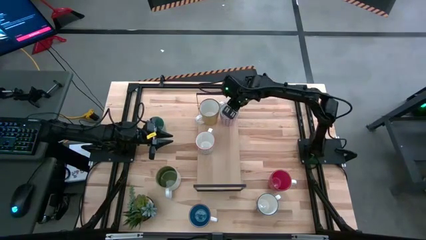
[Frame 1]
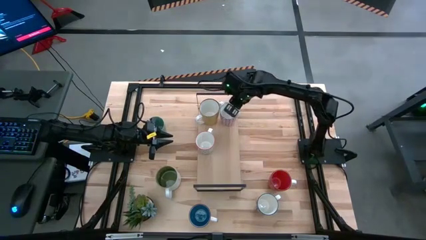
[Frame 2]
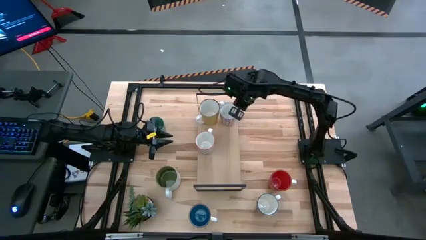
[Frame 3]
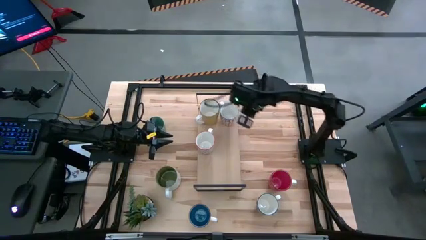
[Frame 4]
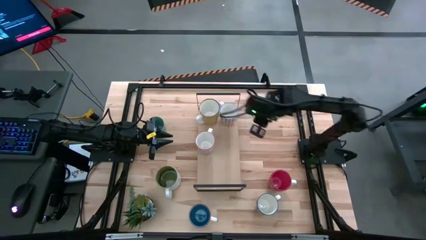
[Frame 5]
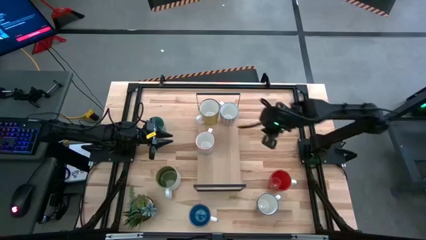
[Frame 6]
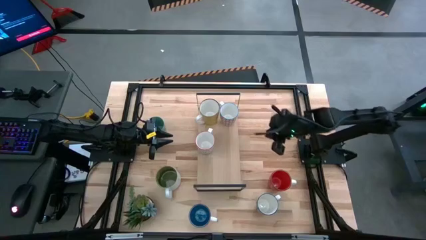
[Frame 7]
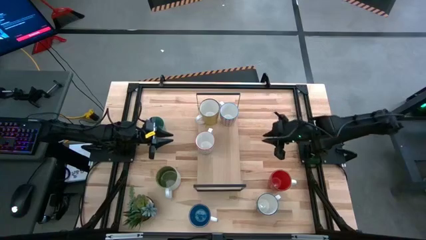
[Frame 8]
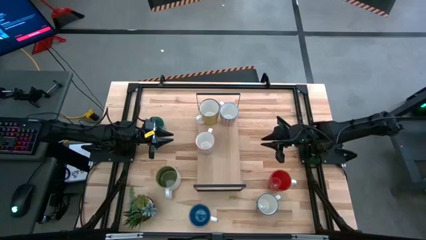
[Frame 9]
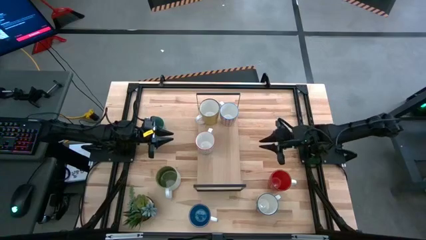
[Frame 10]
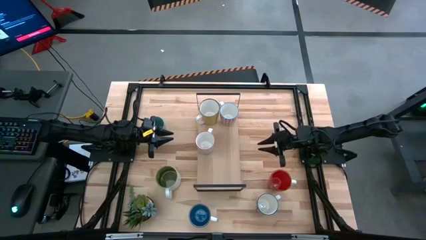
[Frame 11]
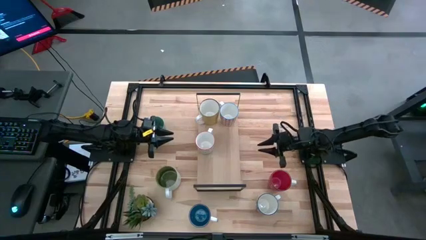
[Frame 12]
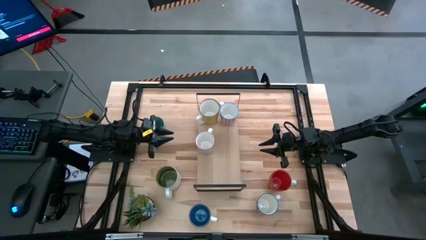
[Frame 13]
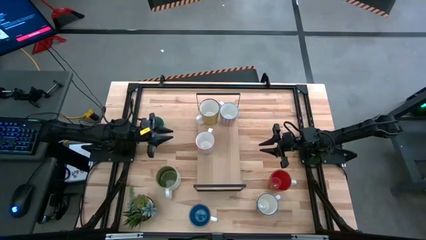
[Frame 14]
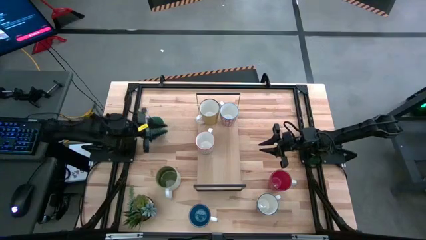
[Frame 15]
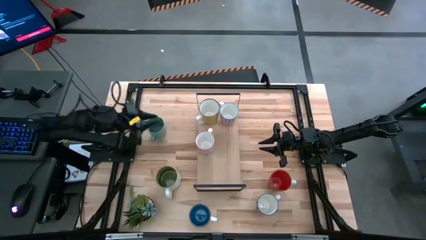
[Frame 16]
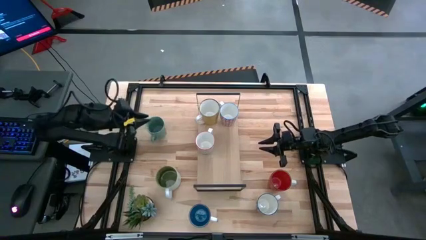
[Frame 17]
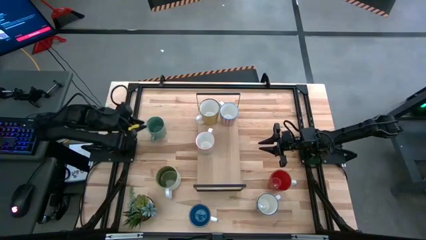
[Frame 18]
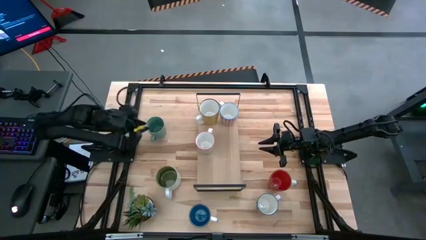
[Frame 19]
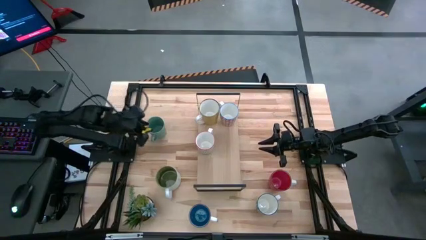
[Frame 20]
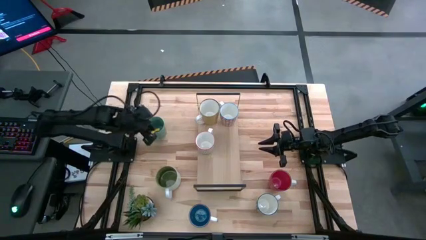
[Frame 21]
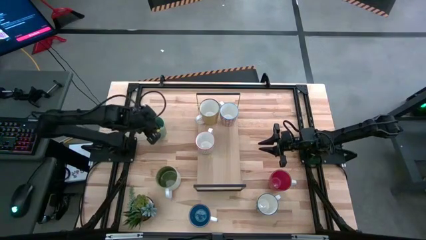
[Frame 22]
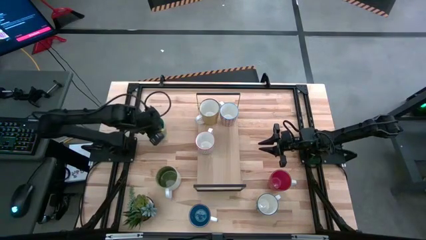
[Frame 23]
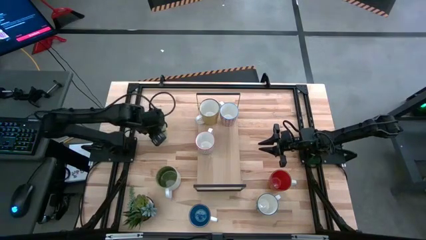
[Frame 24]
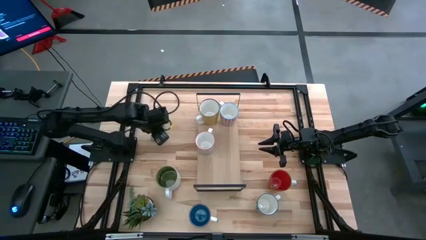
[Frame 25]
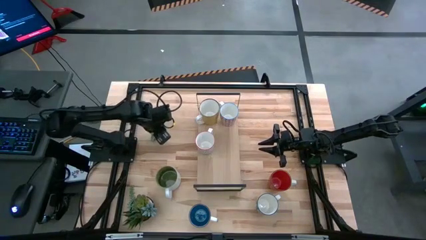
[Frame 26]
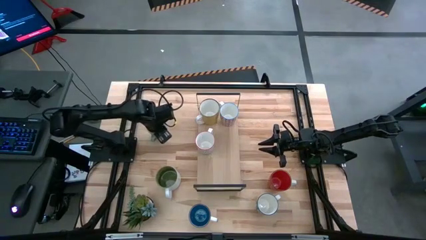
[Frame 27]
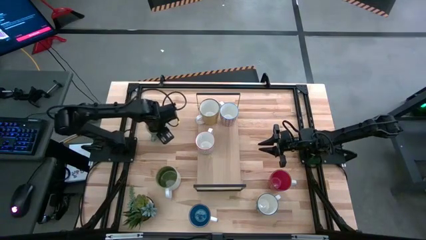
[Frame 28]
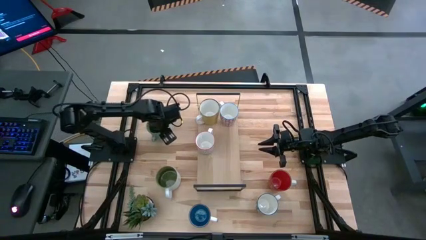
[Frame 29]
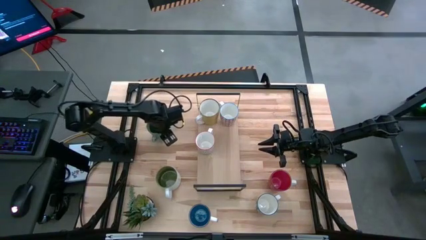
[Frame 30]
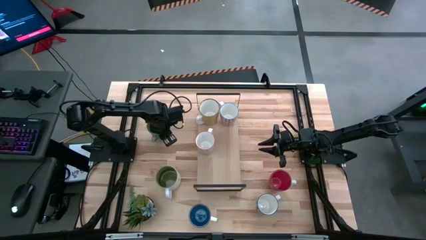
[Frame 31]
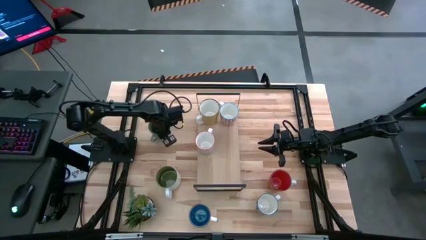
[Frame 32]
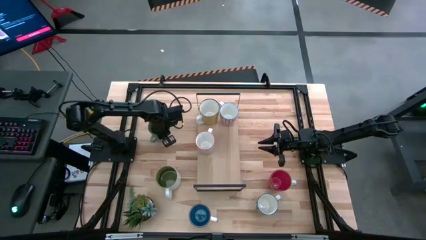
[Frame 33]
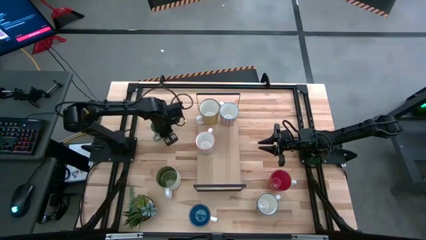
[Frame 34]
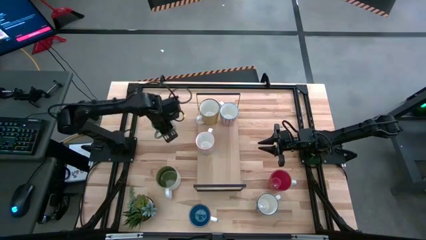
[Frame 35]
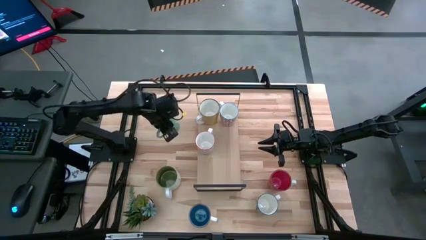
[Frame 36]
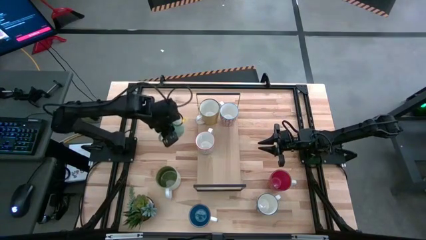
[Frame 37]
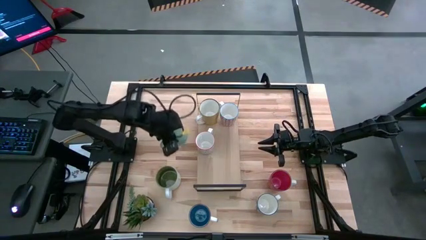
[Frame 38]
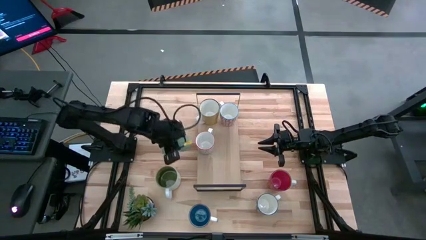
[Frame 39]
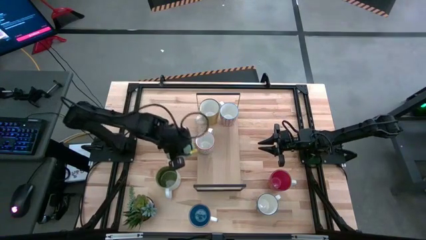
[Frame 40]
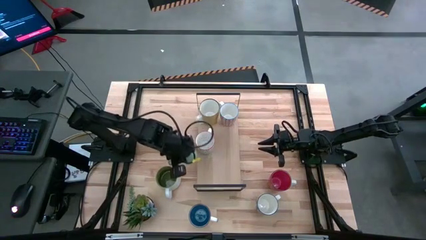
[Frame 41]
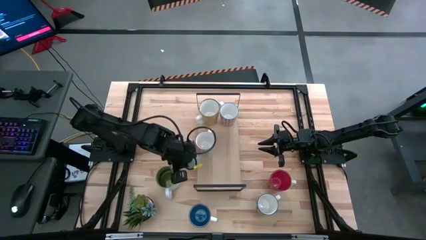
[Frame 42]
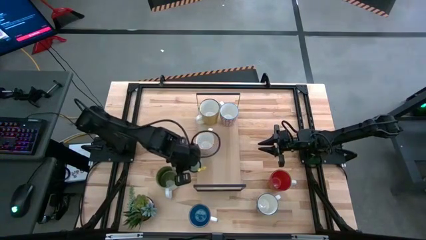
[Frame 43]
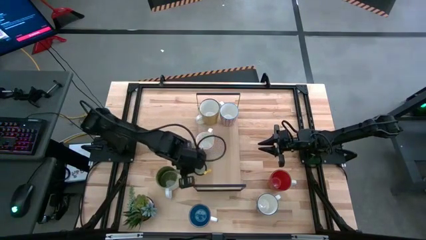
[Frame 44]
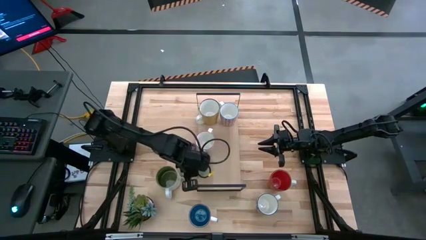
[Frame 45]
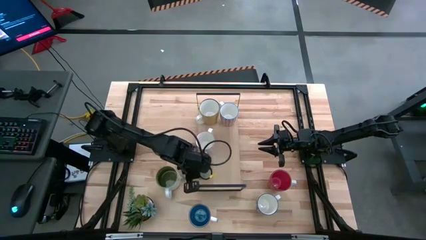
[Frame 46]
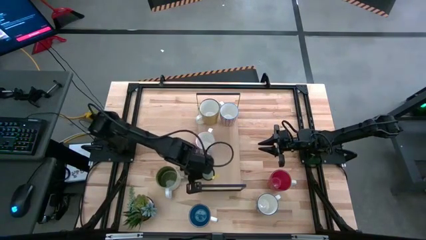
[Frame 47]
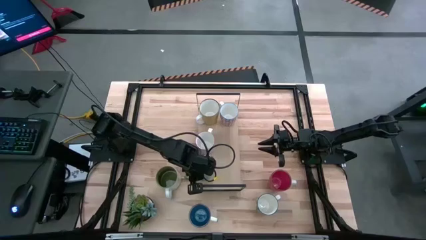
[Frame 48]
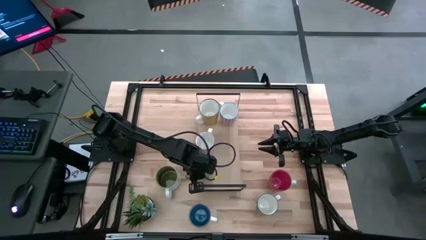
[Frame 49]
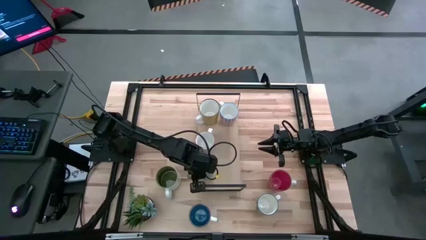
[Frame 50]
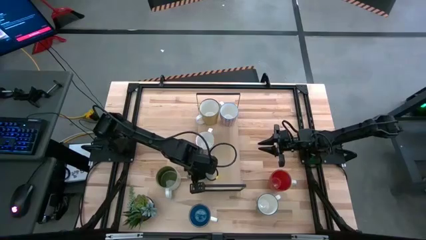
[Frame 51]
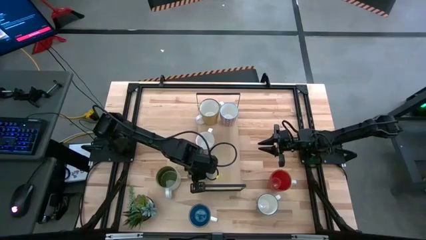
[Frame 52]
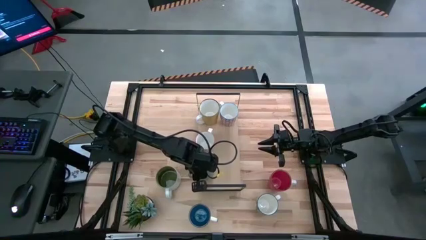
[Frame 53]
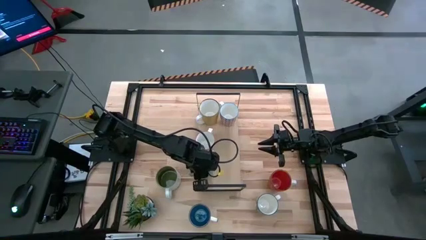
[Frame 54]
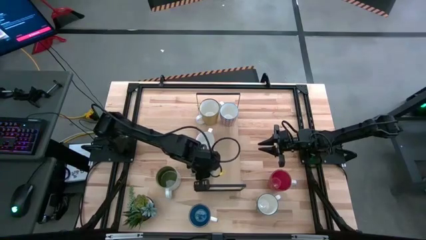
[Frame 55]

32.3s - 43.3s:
Task: Place coffee mugs
Put the green mug on the shelf

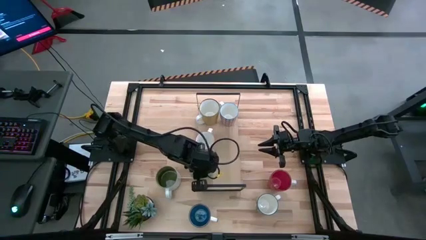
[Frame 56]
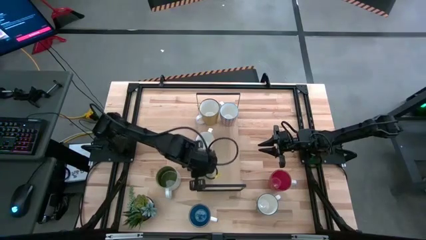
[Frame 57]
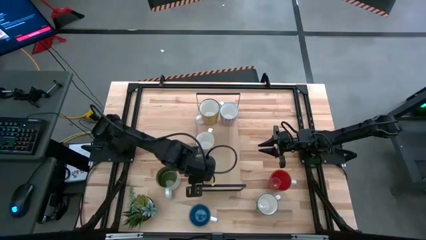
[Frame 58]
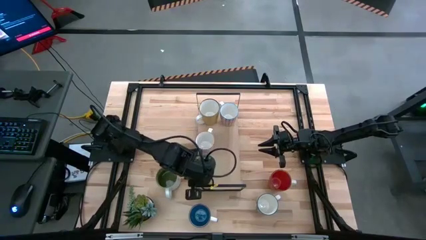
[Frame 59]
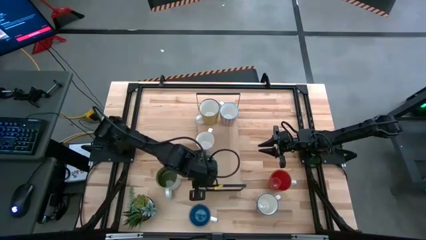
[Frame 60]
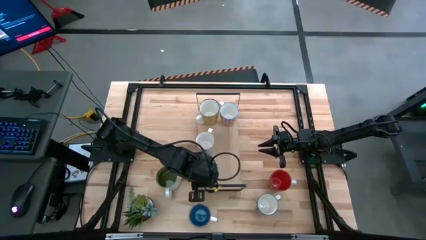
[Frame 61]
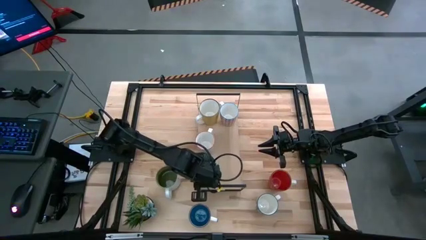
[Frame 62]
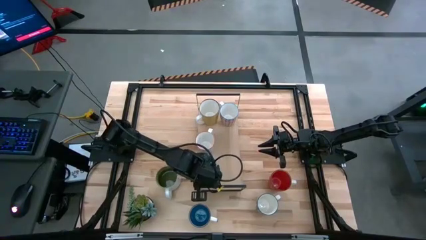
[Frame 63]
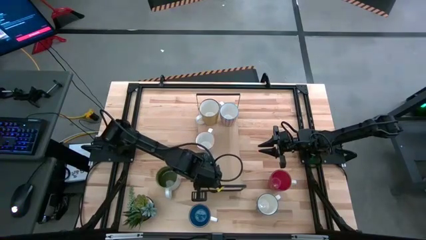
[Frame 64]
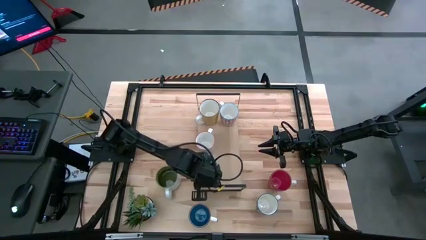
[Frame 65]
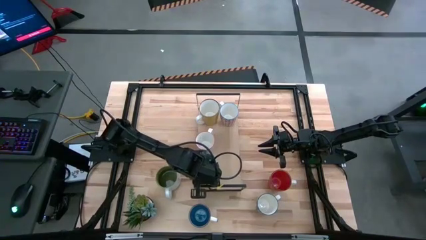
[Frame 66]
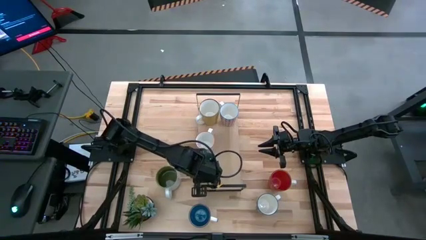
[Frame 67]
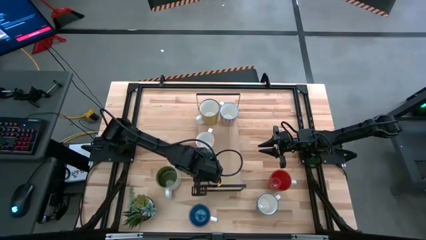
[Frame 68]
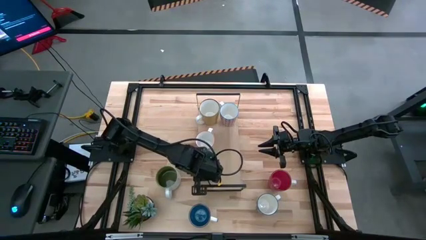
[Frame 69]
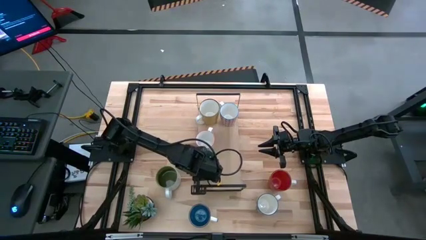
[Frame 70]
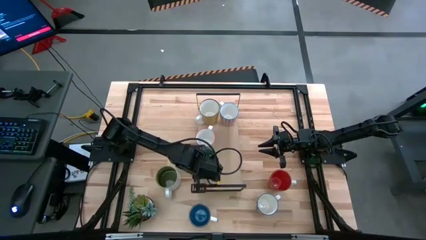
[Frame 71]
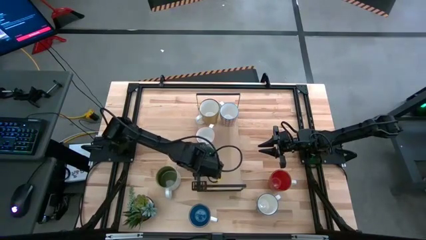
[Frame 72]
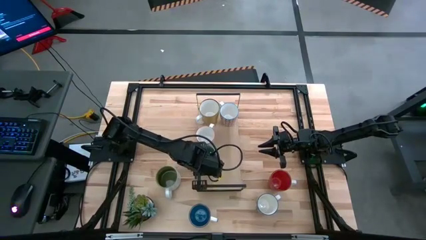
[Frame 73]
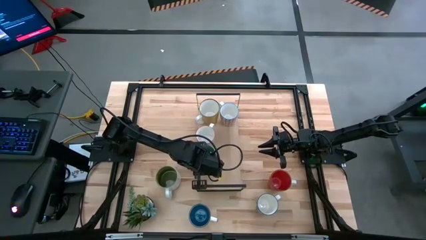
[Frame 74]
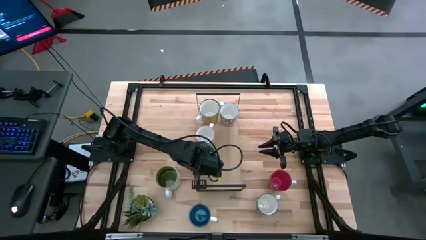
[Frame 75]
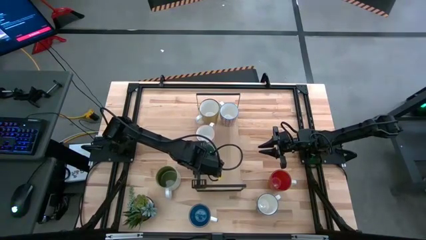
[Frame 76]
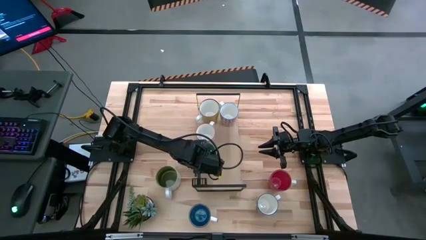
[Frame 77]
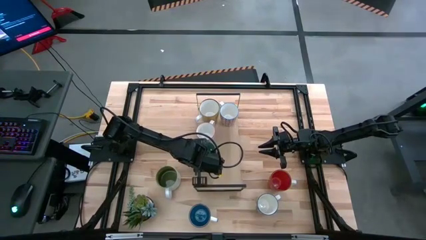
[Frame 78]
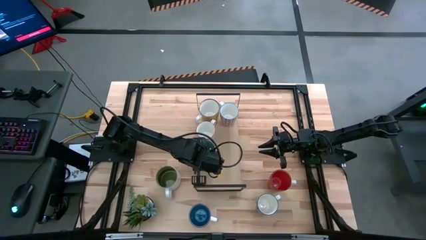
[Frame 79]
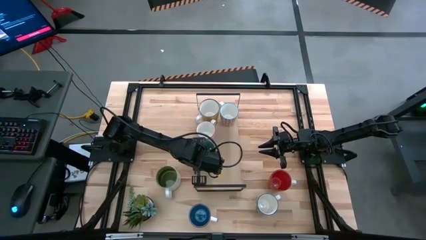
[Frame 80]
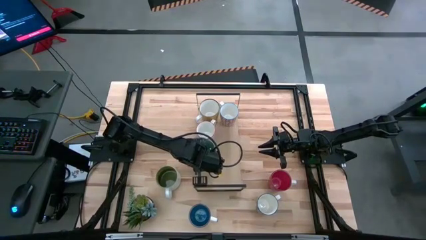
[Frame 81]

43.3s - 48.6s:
Move the green mug on the shelf

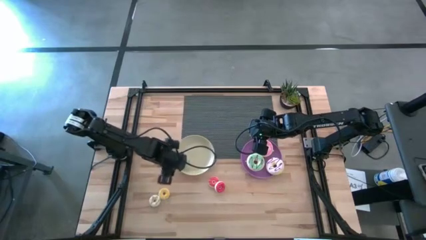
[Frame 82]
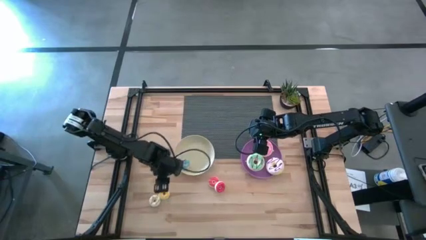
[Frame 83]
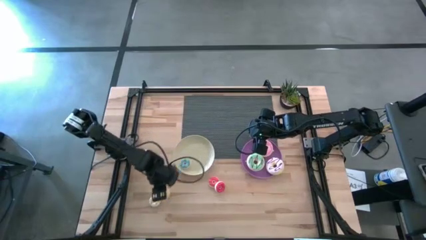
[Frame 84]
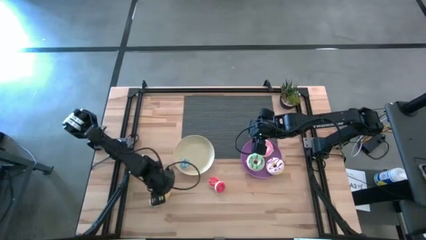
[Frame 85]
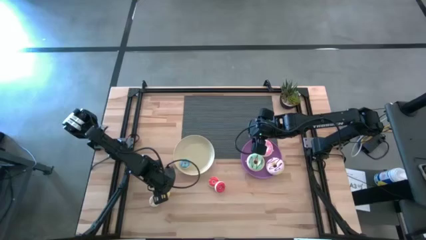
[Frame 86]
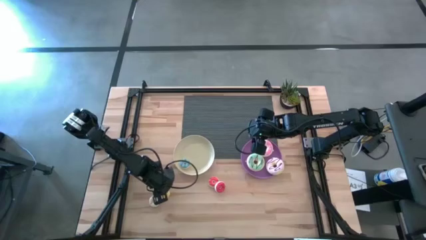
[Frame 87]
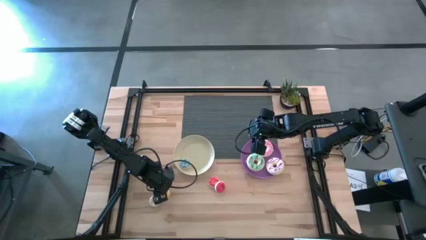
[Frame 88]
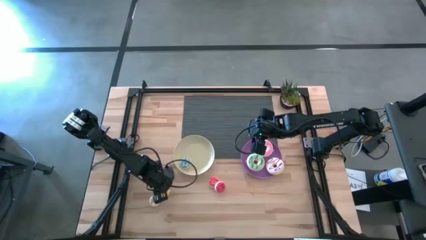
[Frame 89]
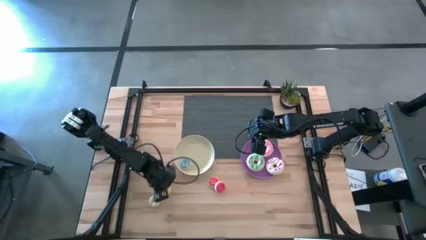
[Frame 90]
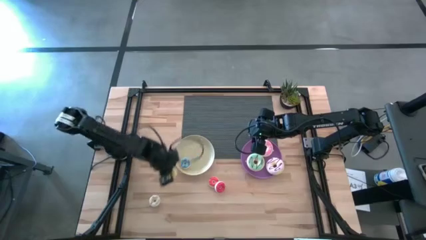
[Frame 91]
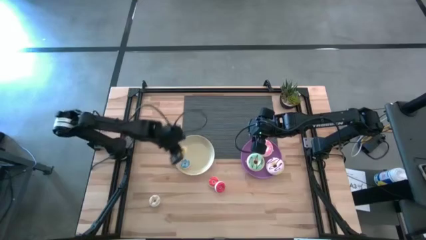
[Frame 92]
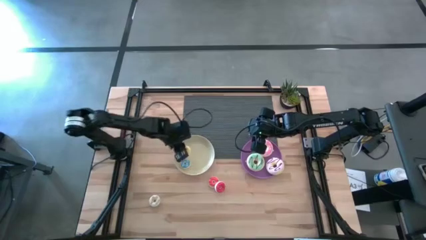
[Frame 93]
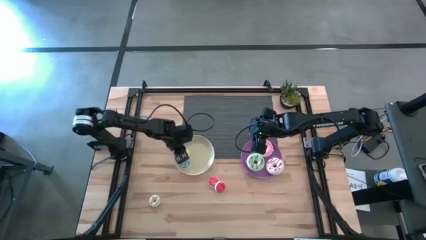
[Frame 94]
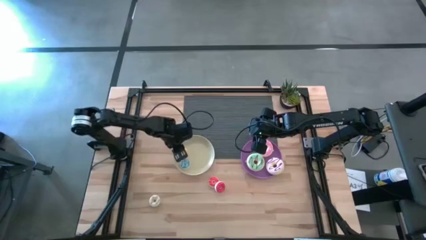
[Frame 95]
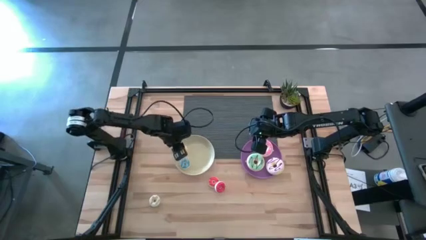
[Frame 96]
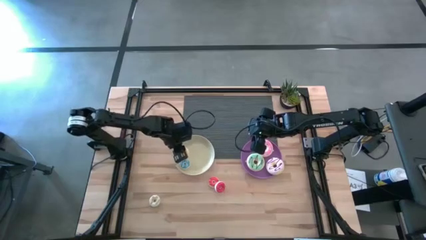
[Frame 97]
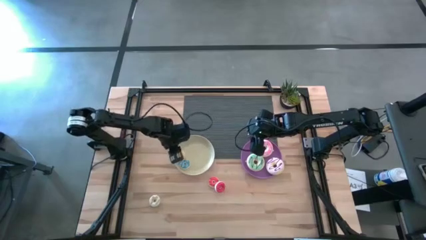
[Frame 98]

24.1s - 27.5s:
Task: Pick & Place donuts
Put the small yellow donut on the white plate
